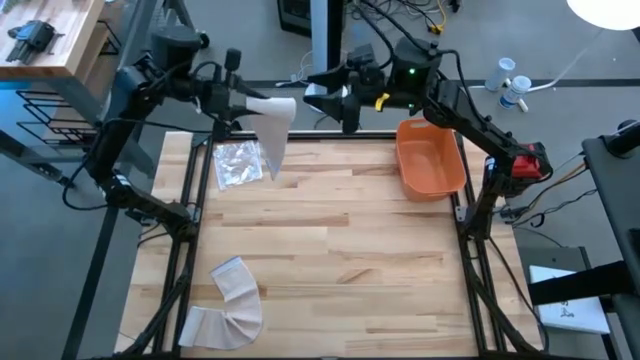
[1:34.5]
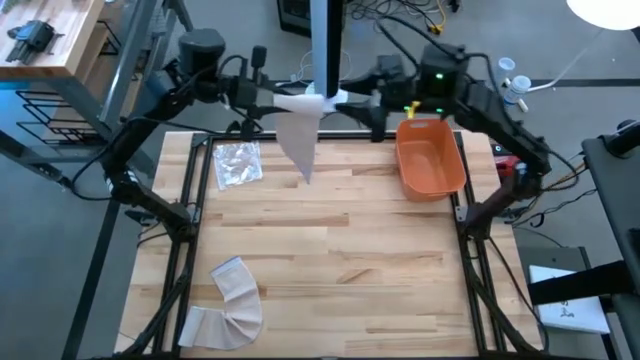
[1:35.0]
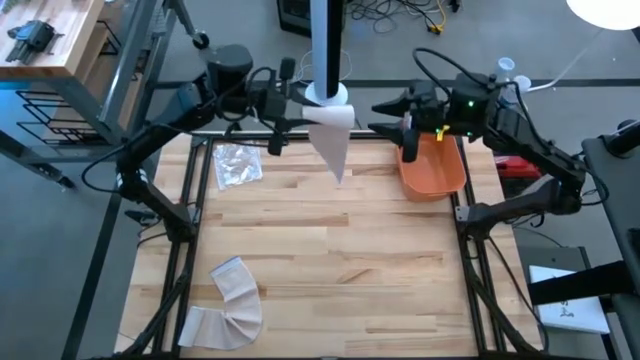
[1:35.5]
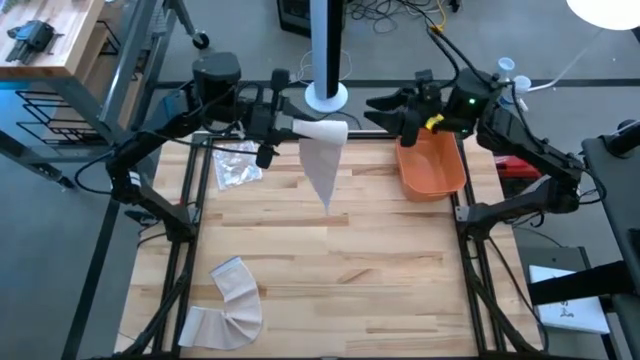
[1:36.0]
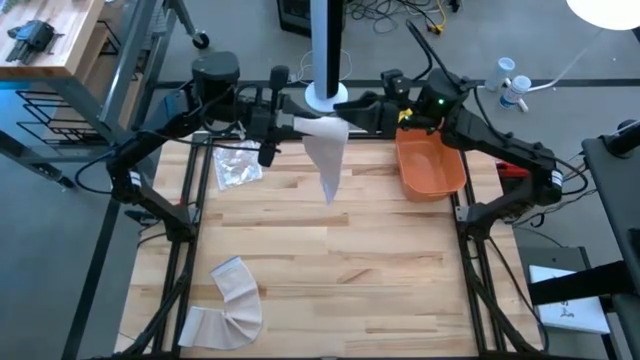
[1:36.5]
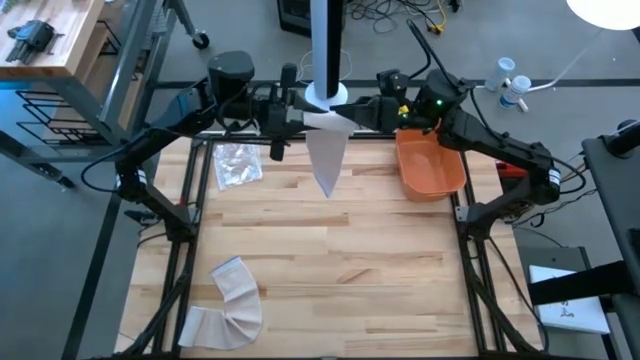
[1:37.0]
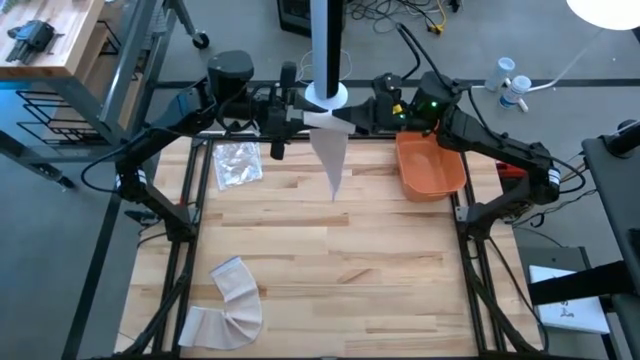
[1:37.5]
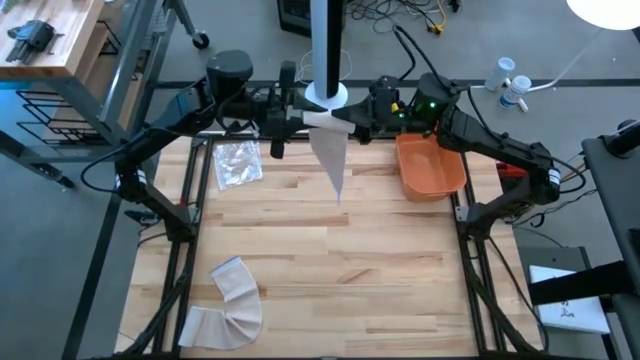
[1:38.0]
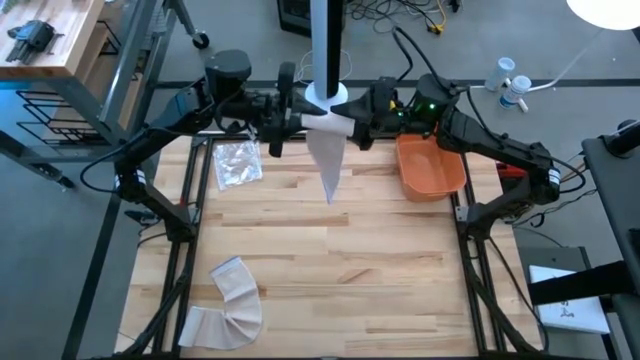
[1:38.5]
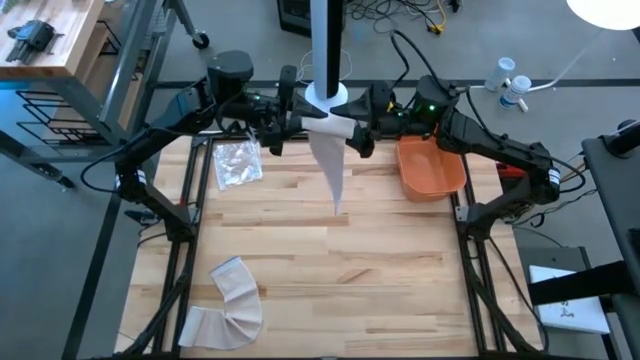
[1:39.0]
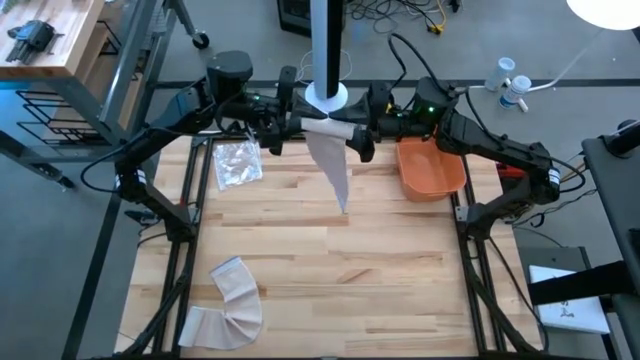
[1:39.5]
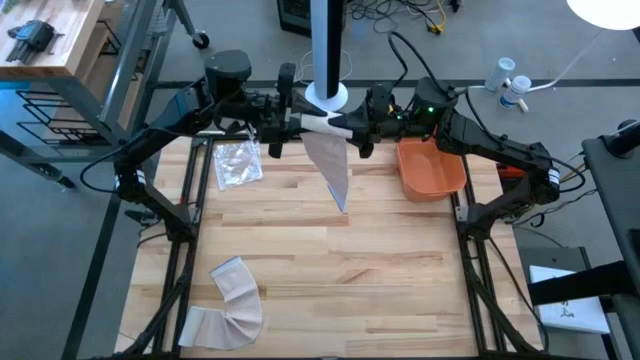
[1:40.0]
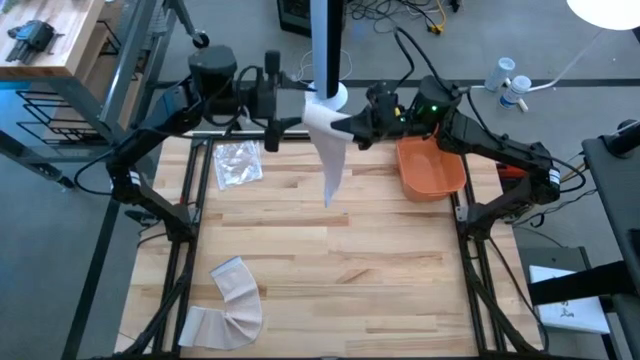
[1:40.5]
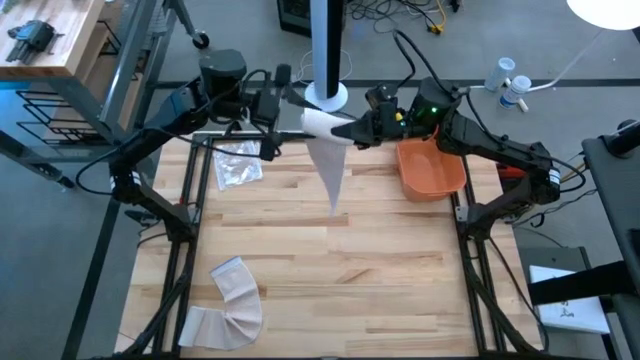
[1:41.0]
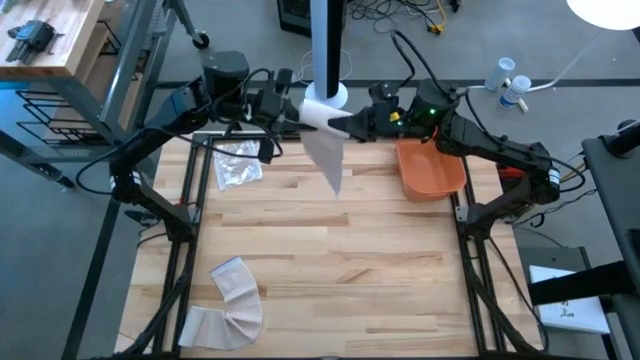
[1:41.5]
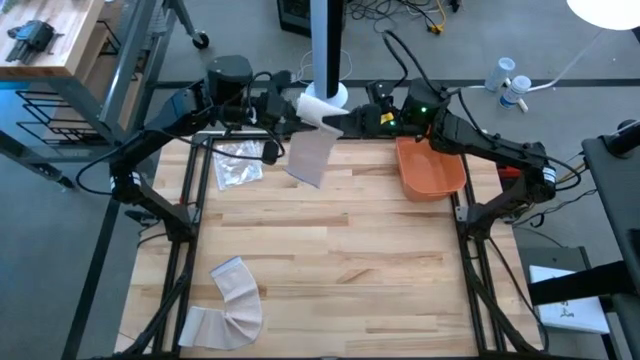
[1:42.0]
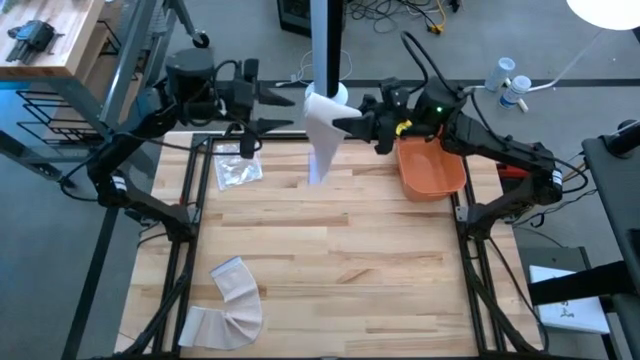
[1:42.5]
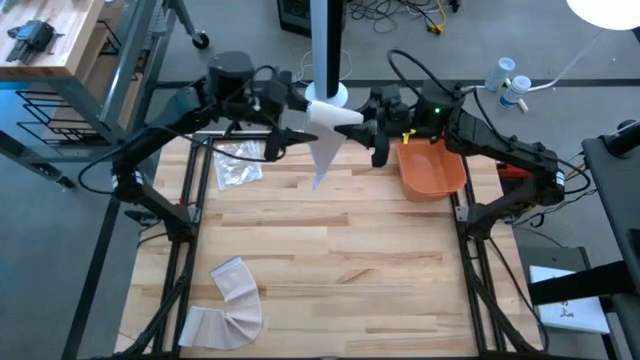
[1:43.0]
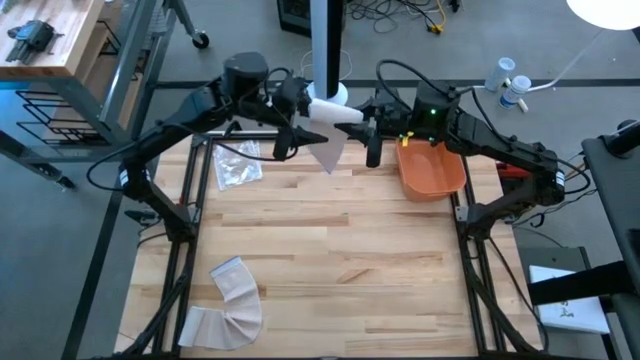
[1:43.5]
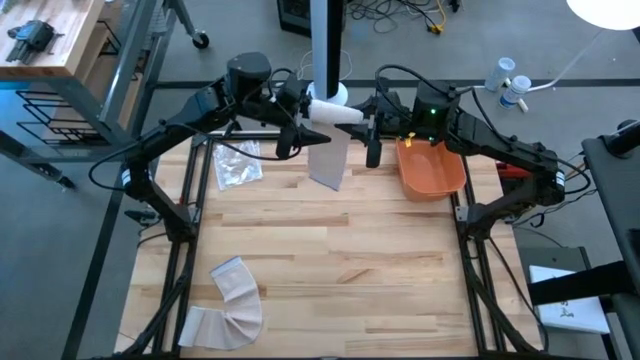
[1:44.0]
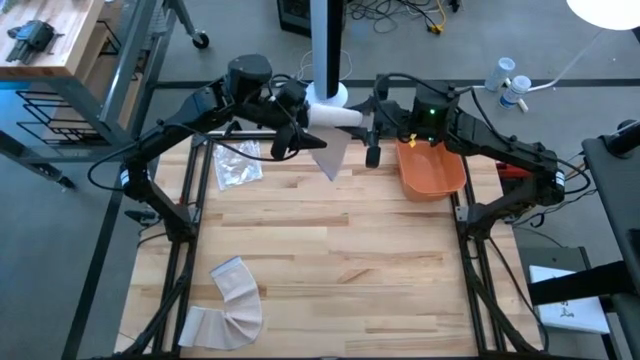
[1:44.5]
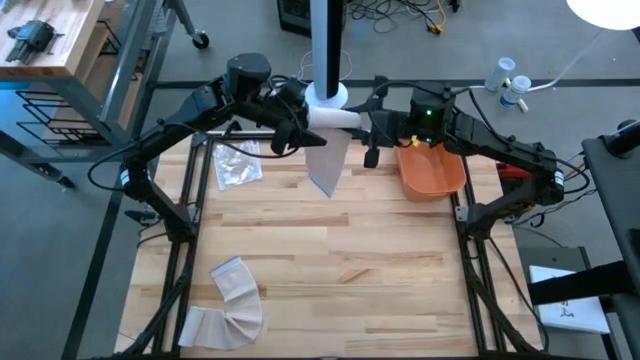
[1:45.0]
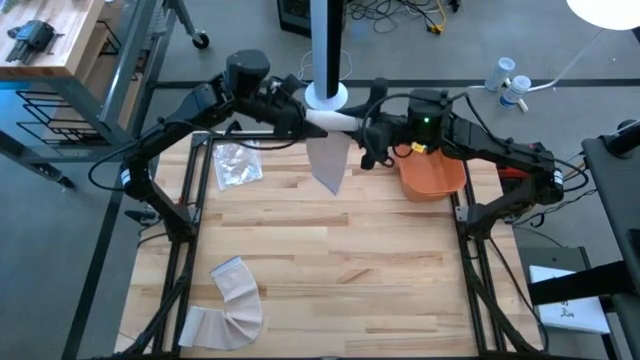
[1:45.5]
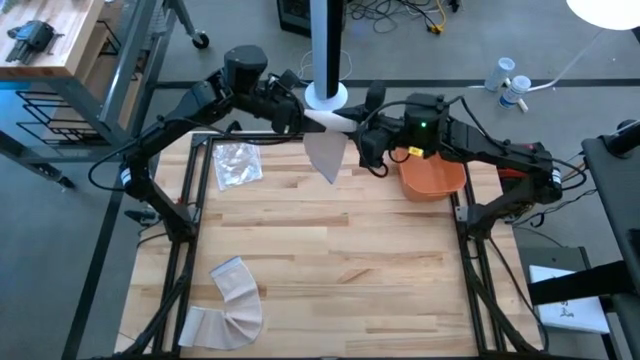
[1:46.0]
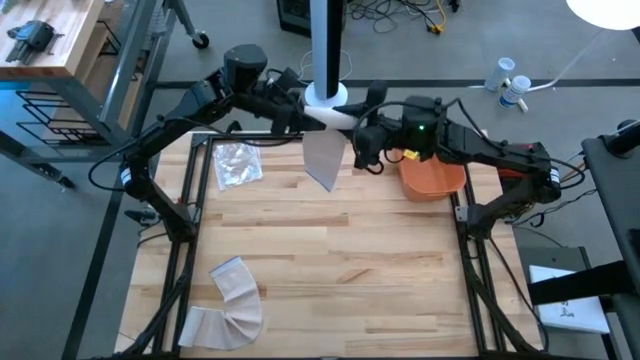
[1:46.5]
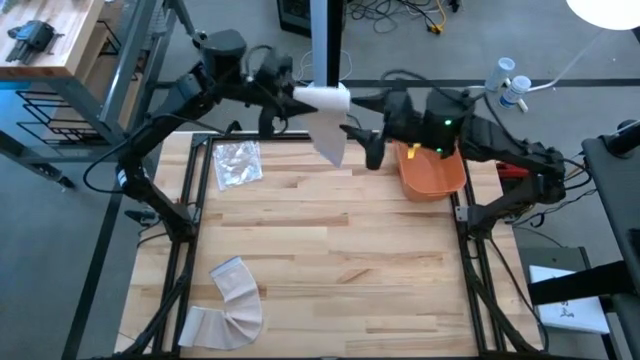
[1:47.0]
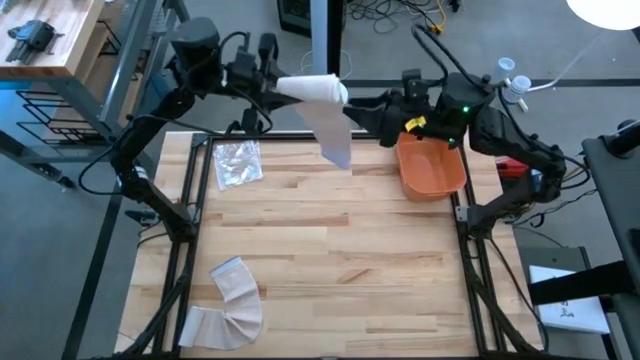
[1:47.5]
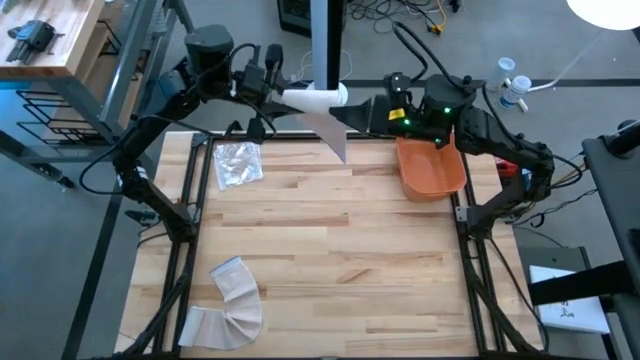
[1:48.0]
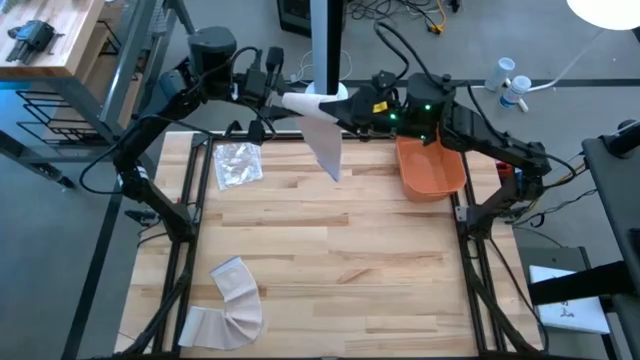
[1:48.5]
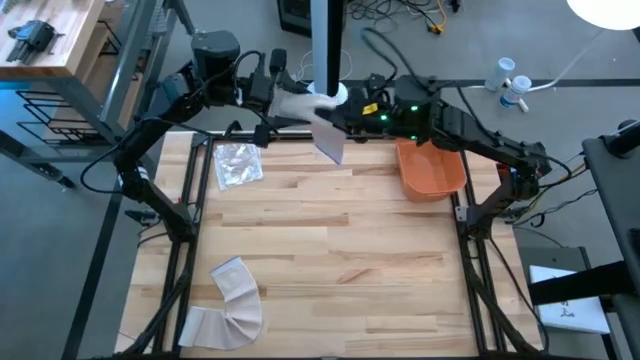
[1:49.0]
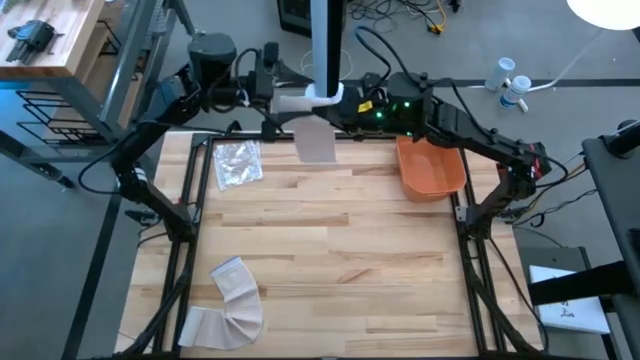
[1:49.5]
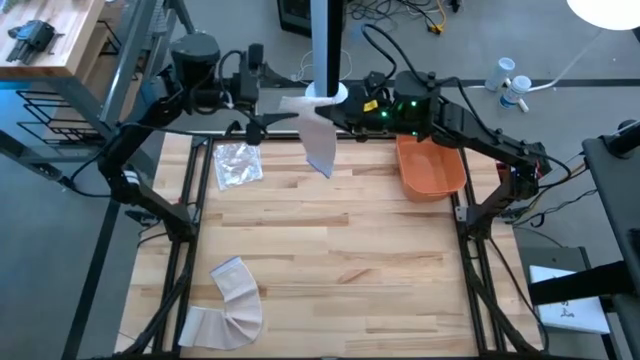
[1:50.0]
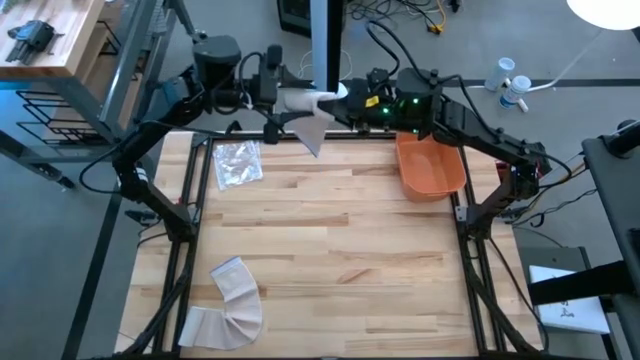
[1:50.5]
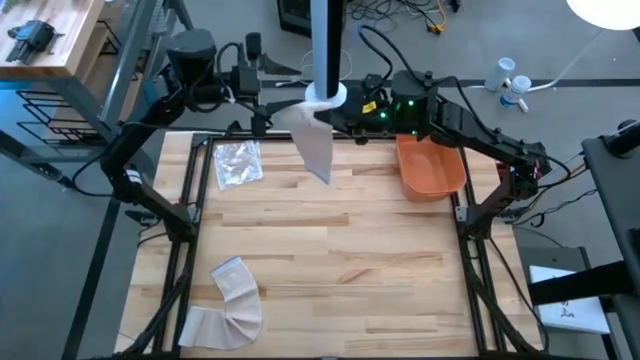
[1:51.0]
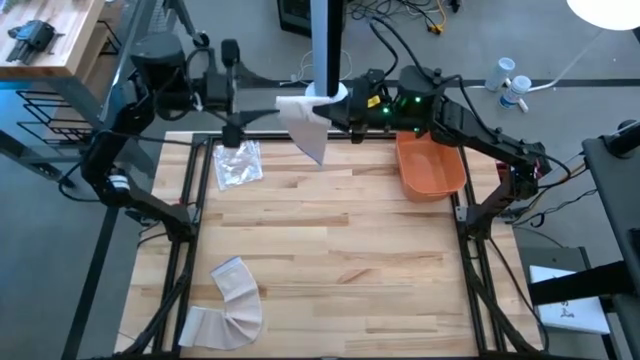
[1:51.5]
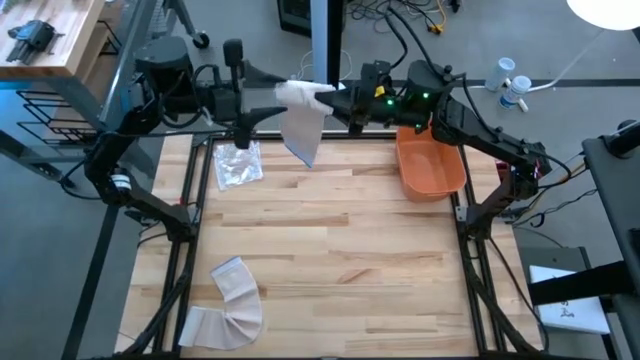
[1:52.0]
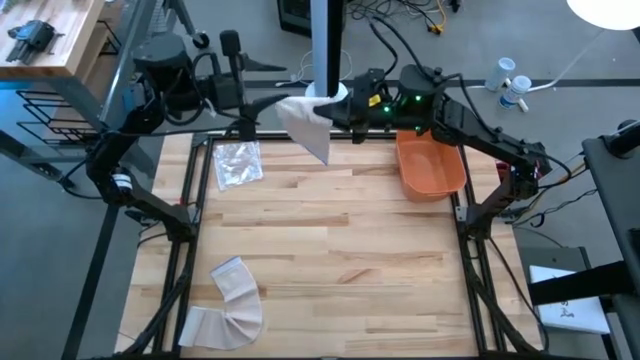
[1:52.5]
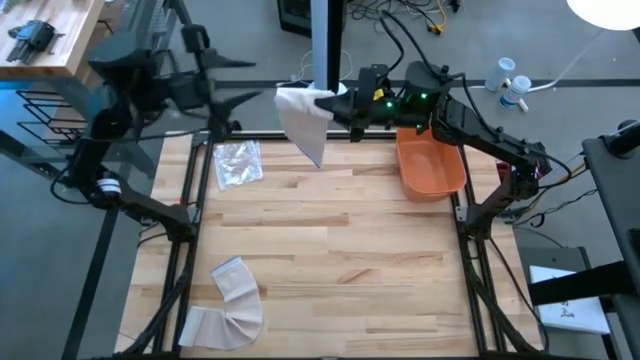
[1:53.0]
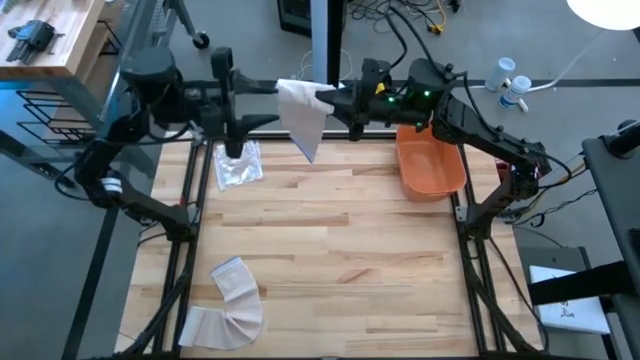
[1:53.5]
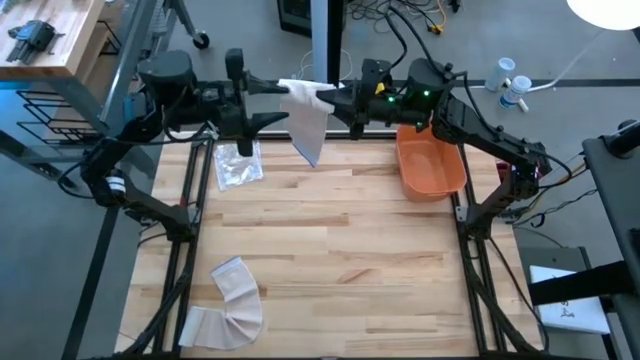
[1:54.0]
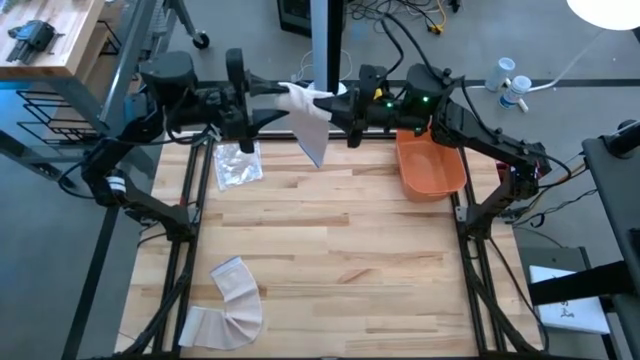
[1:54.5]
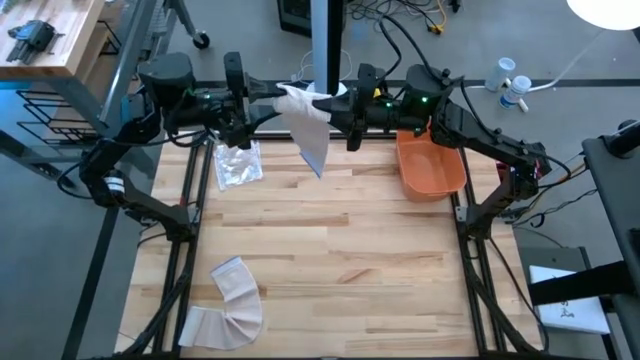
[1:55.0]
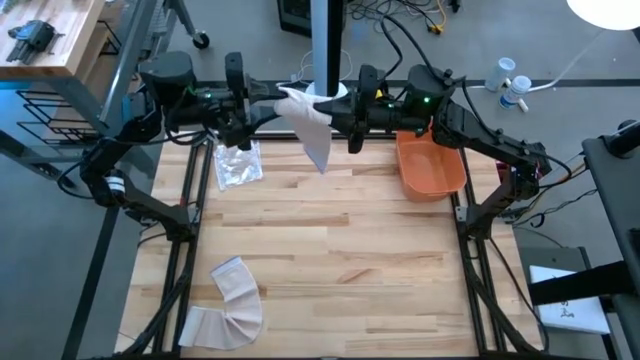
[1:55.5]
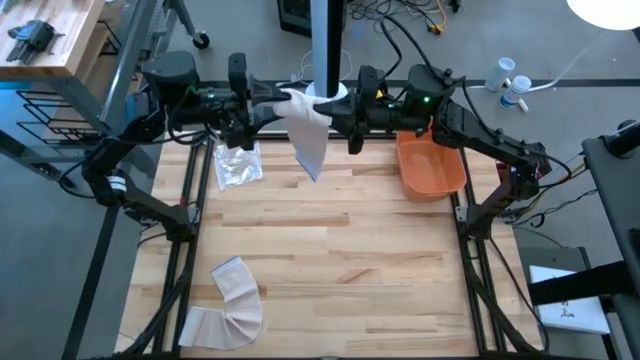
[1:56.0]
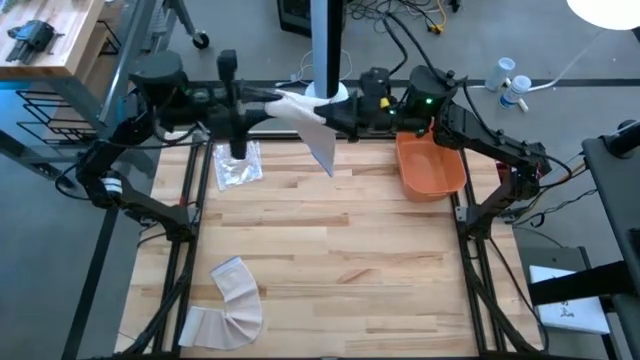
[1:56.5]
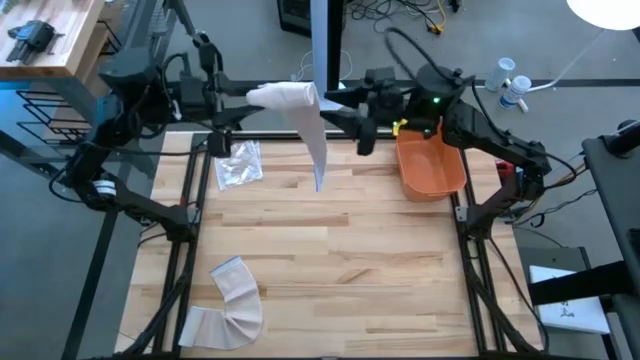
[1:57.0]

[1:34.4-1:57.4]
Task: Roll bandage
Roll the center brown bandage
